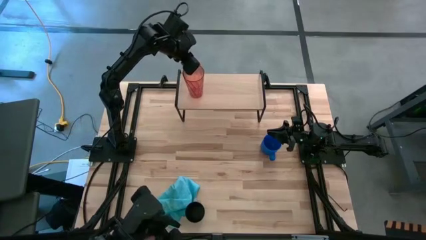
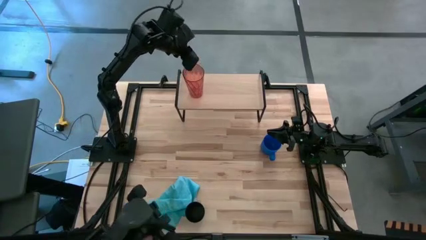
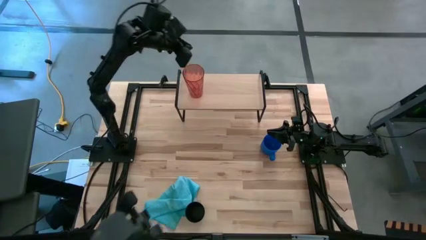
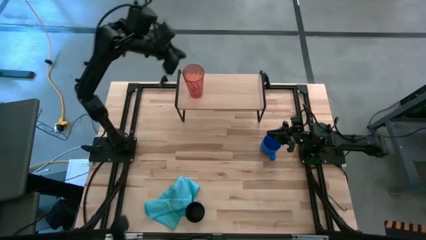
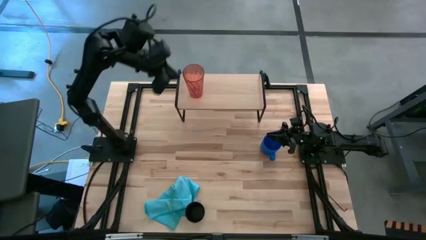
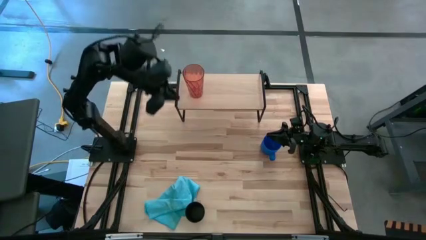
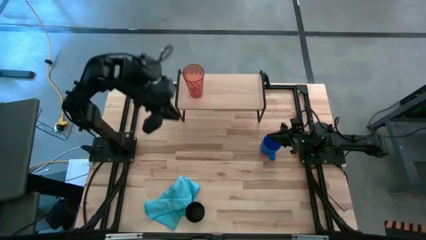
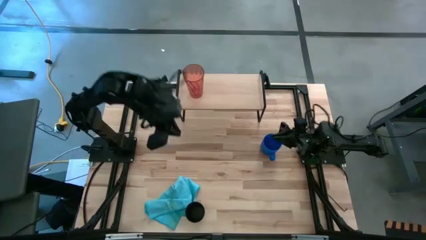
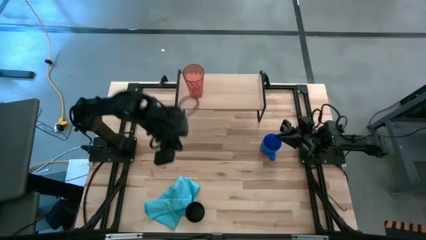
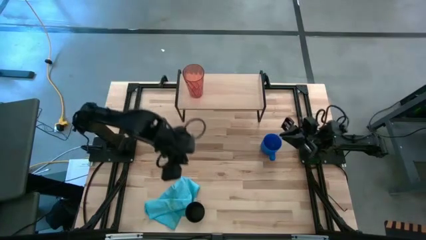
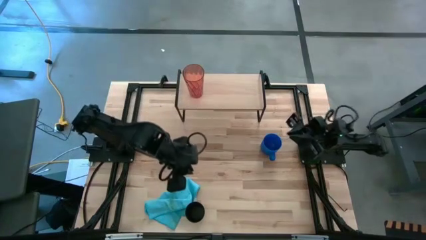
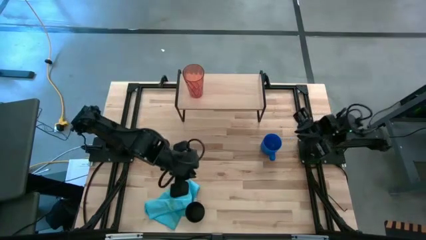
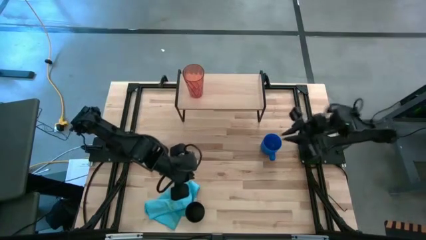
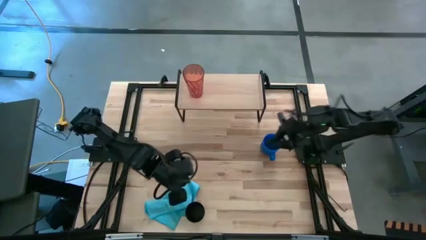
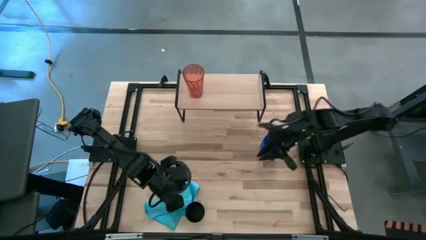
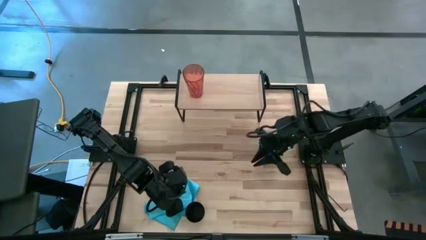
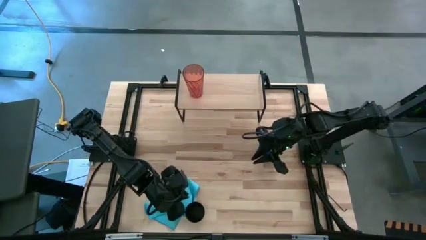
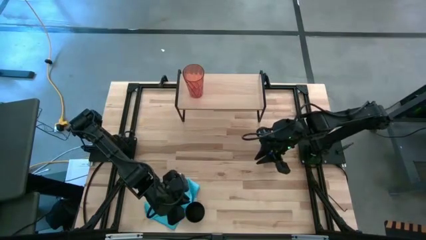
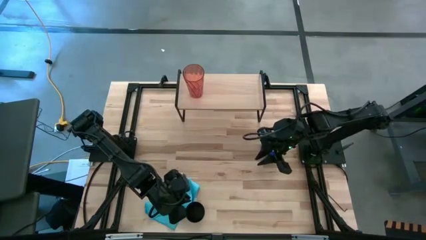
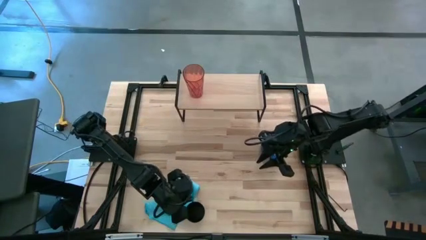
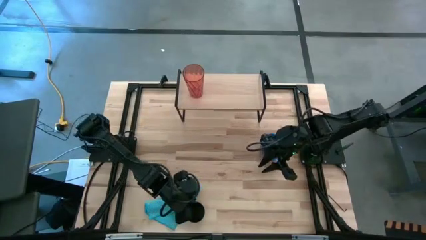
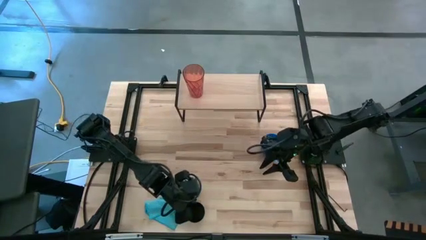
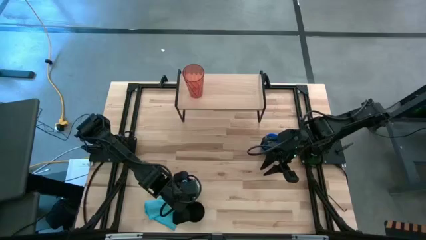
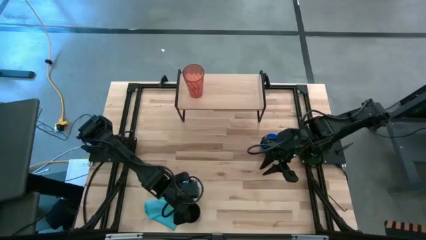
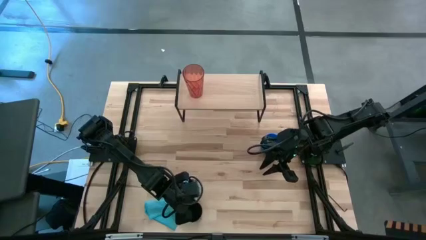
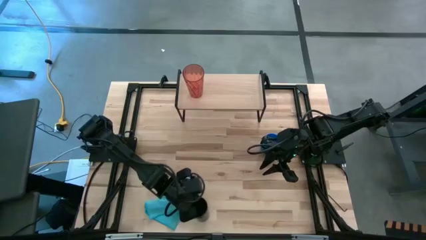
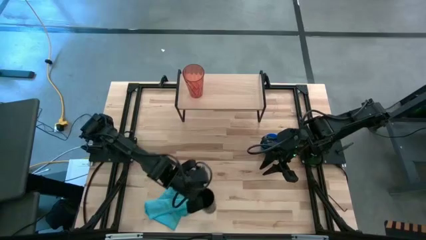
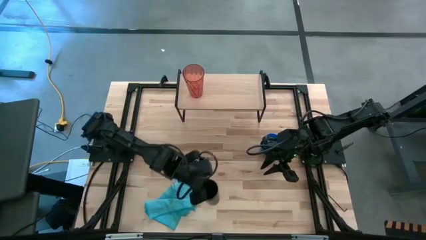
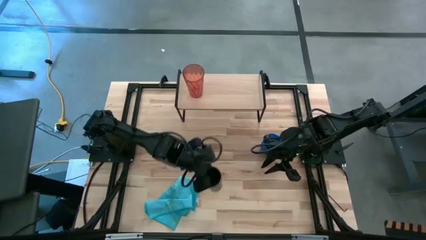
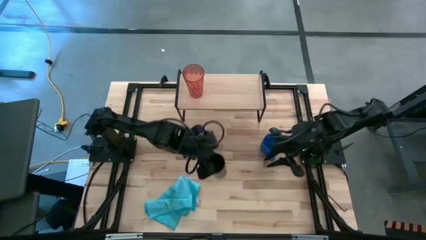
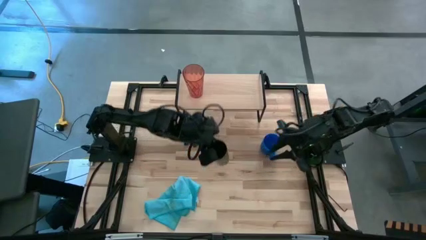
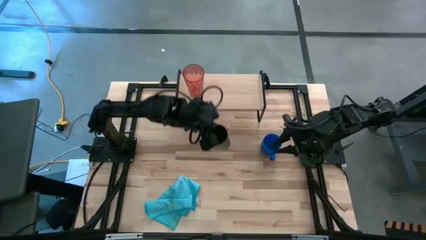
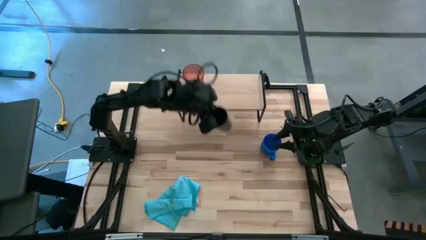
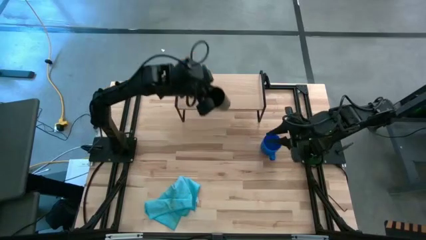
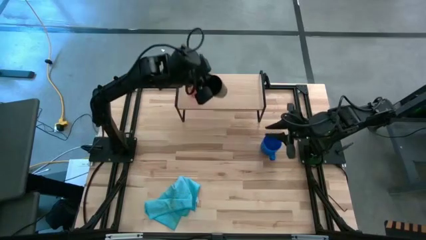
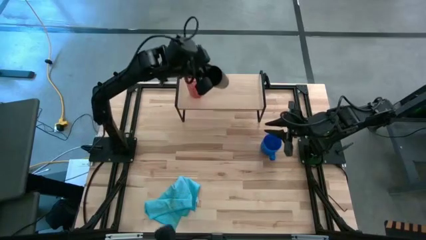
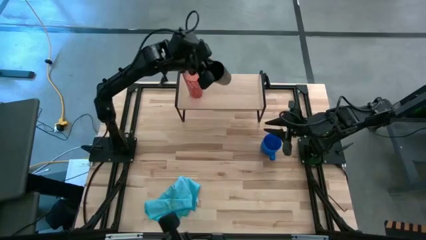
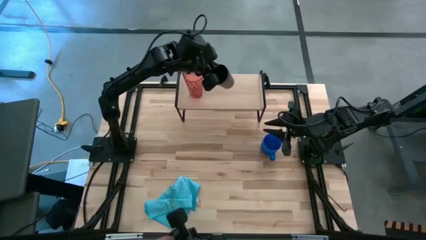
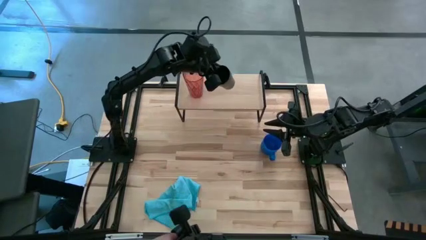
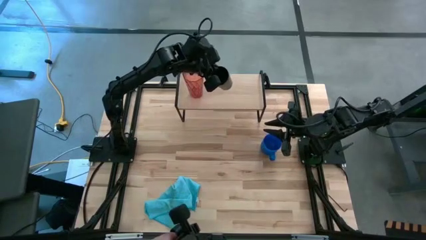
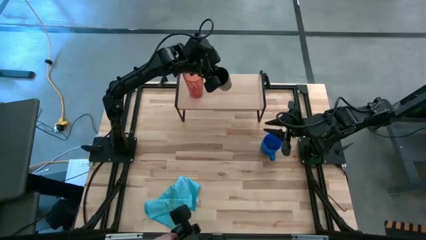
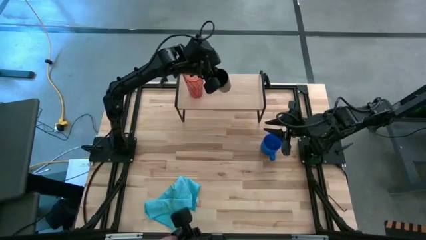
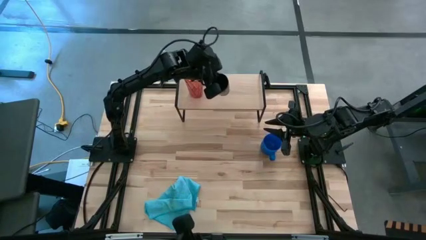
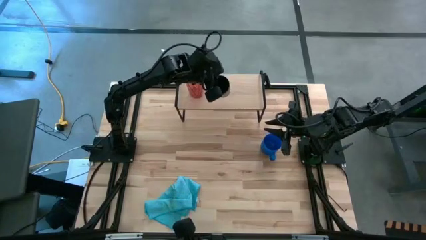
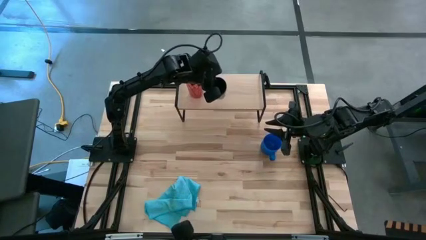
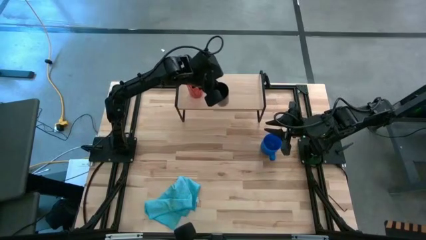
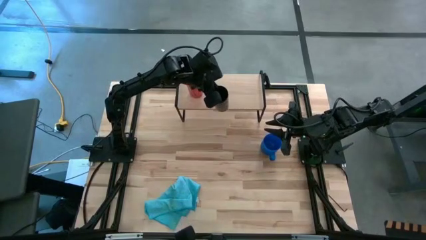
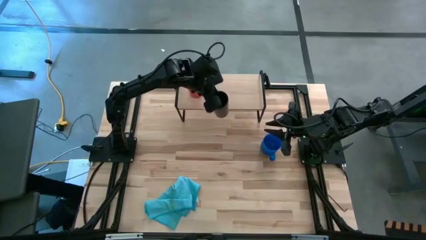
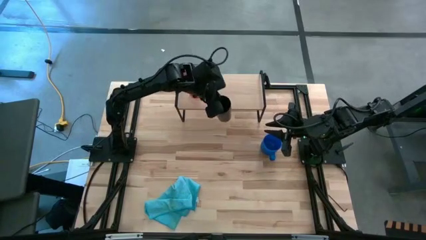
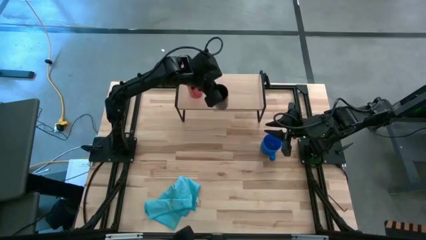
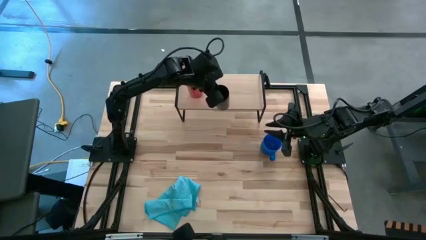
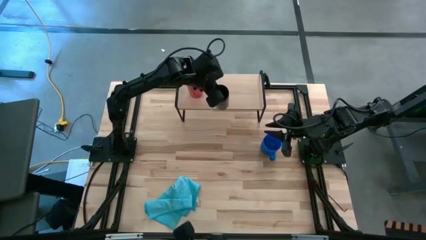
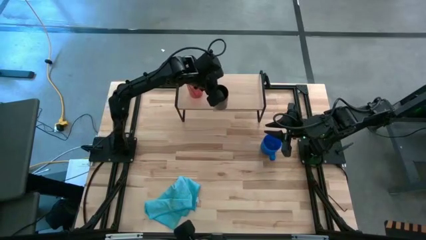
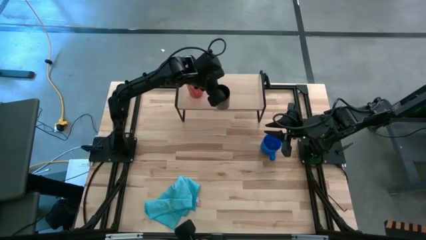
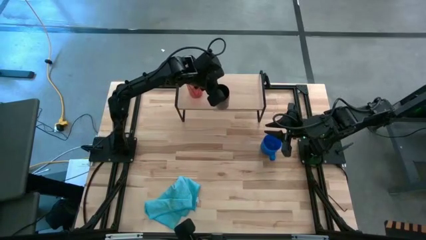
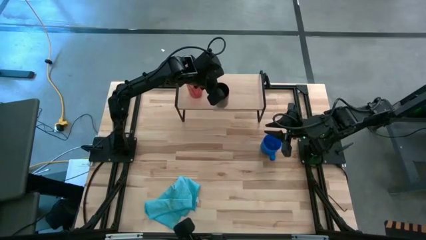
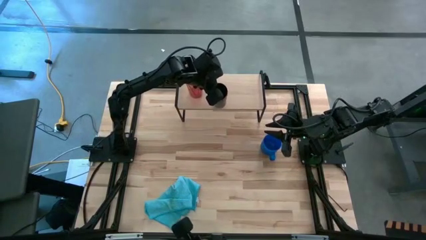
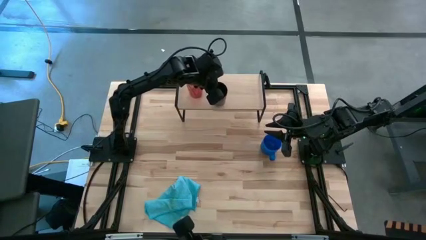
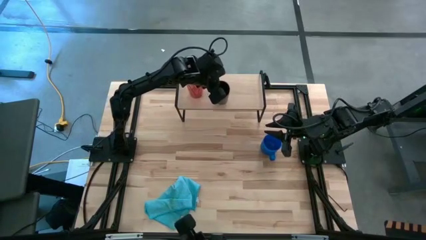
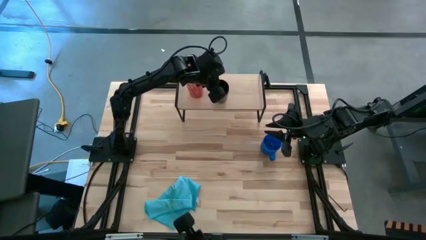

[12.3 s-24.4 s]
Task: Stack small to large cups/mugs on shelf
Put the black cup on the shelf
